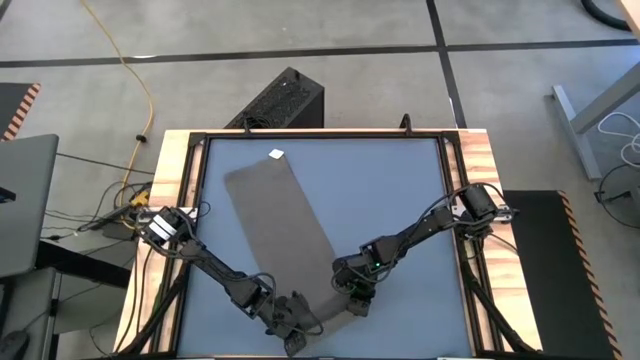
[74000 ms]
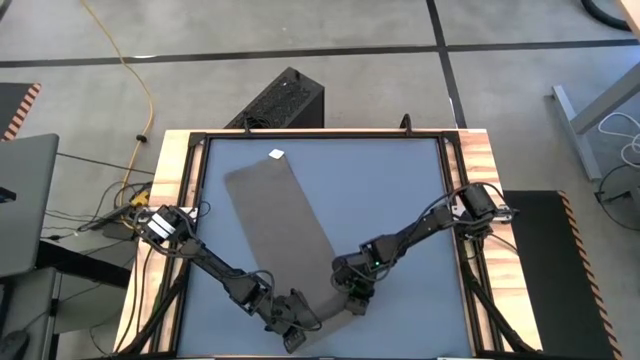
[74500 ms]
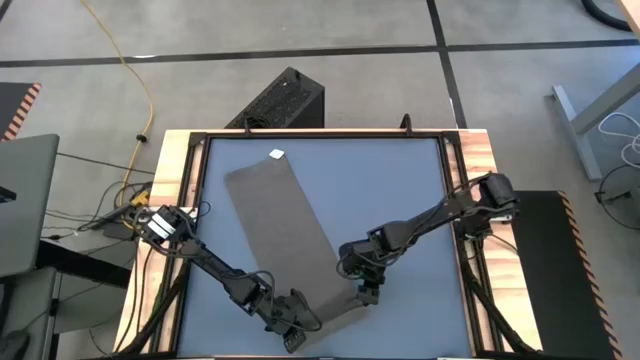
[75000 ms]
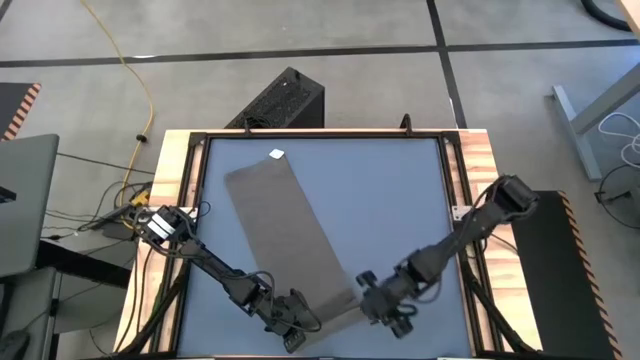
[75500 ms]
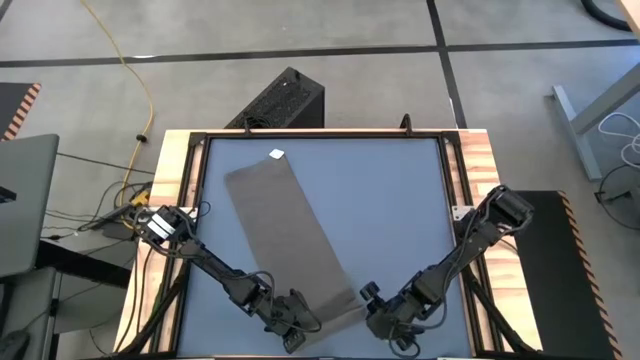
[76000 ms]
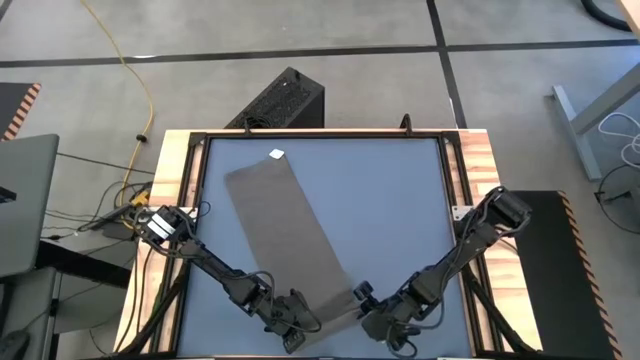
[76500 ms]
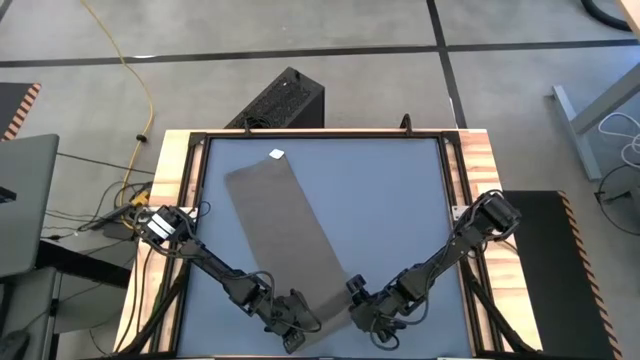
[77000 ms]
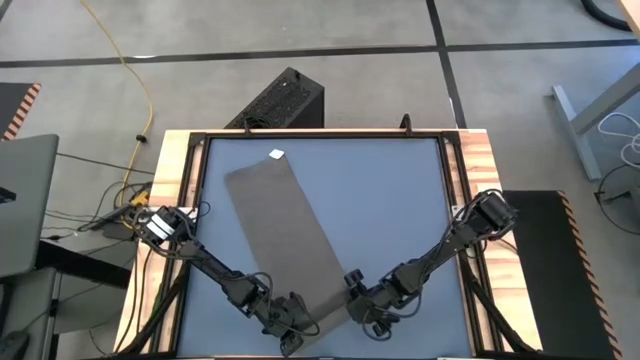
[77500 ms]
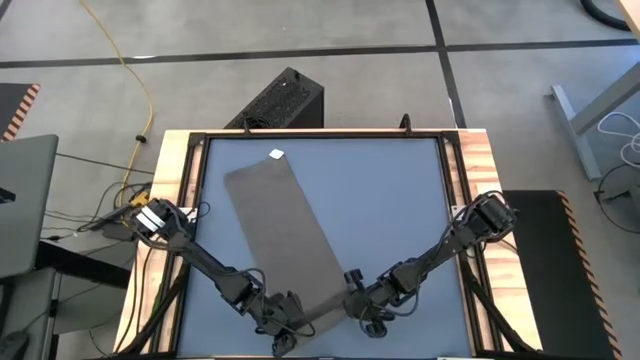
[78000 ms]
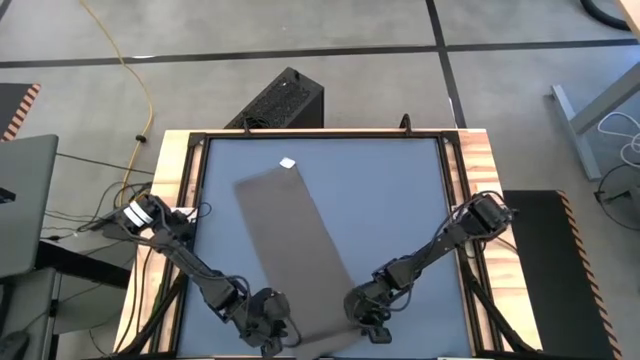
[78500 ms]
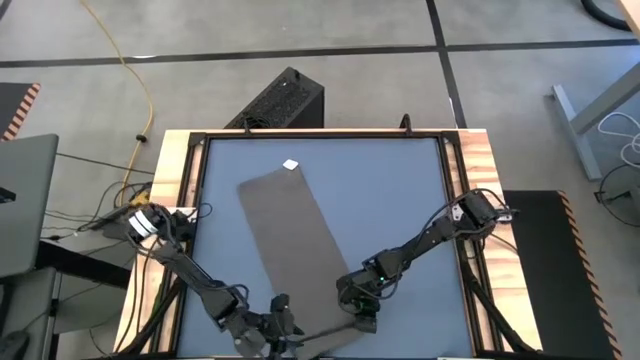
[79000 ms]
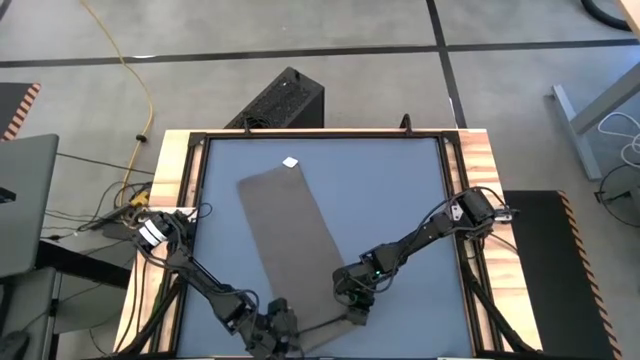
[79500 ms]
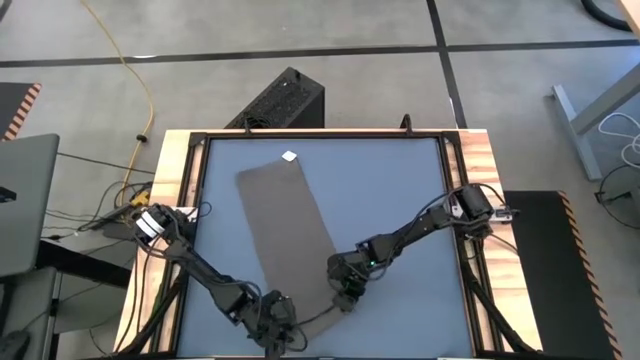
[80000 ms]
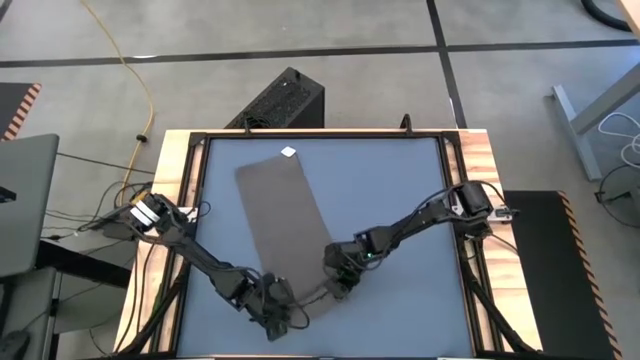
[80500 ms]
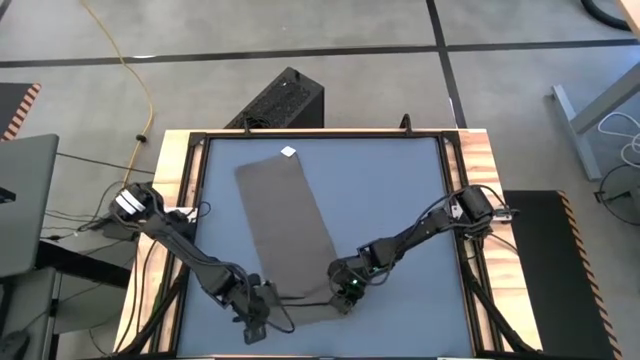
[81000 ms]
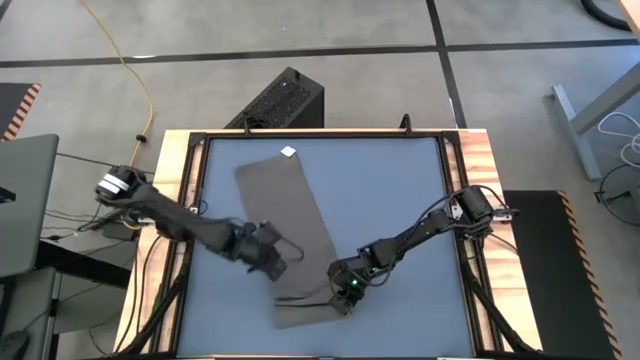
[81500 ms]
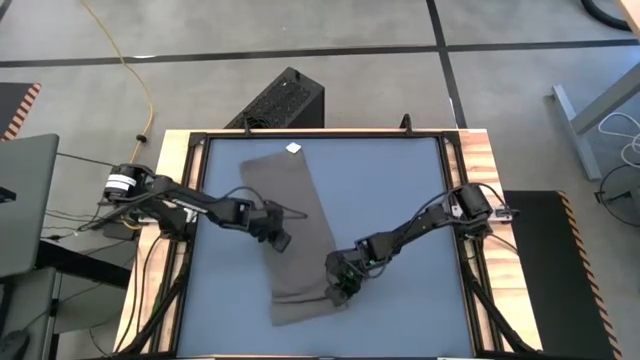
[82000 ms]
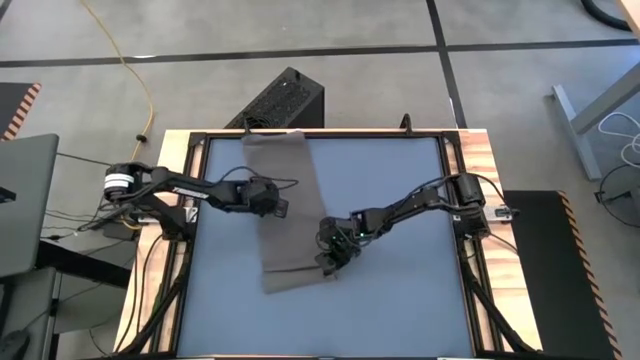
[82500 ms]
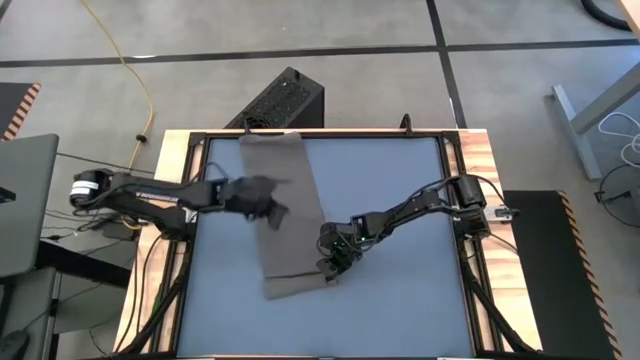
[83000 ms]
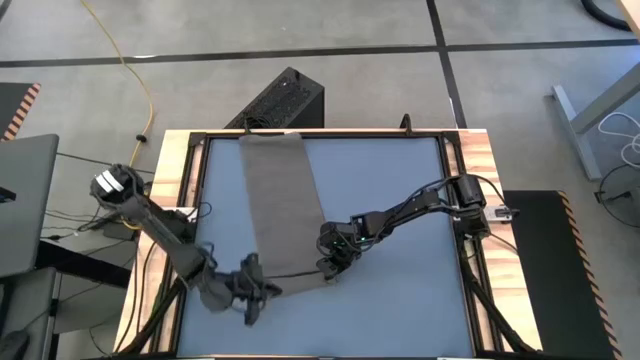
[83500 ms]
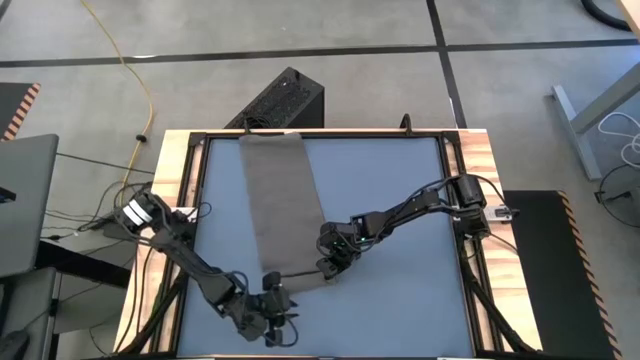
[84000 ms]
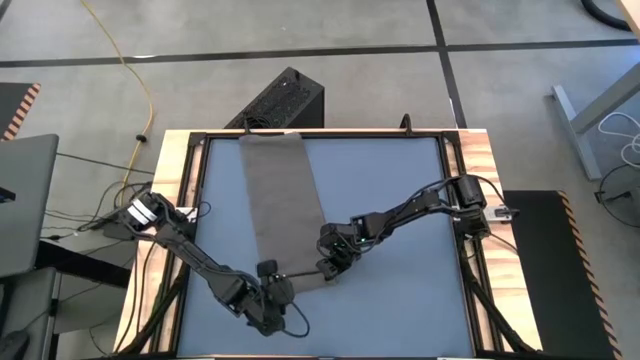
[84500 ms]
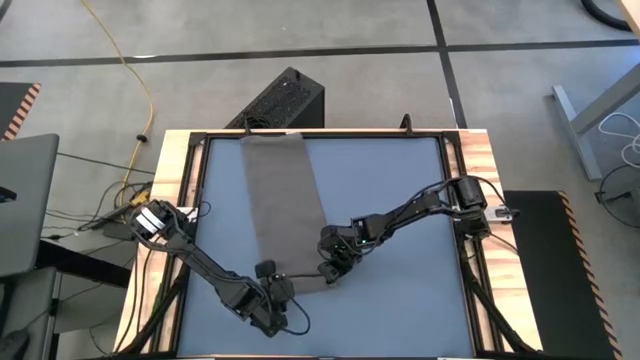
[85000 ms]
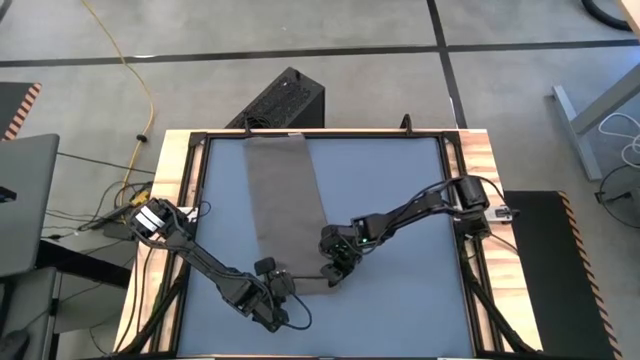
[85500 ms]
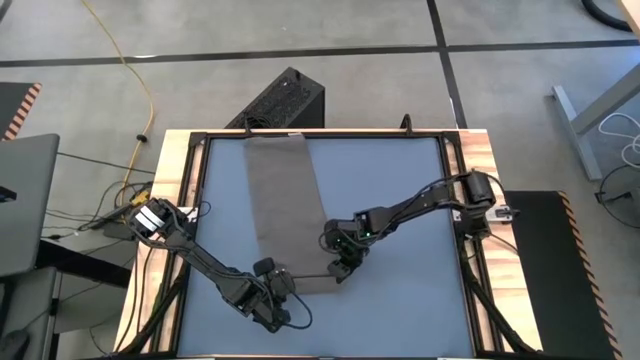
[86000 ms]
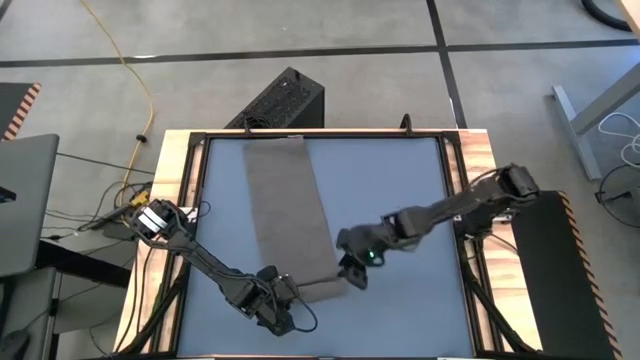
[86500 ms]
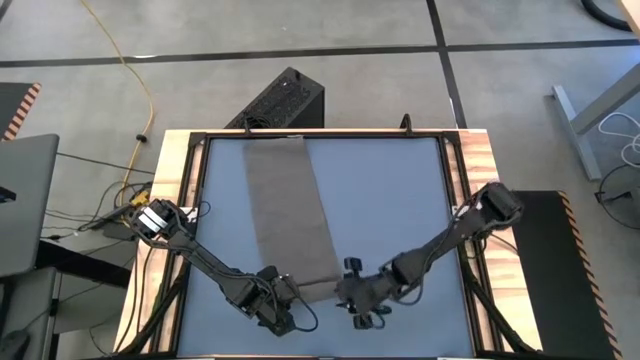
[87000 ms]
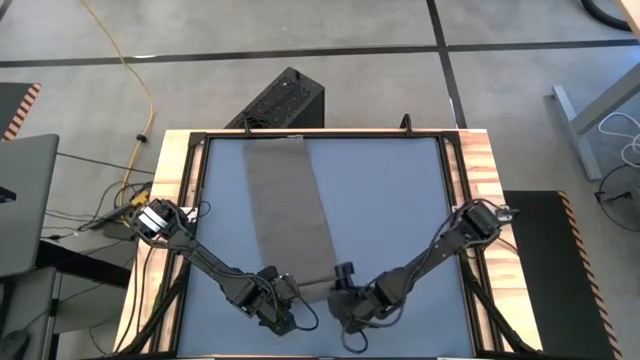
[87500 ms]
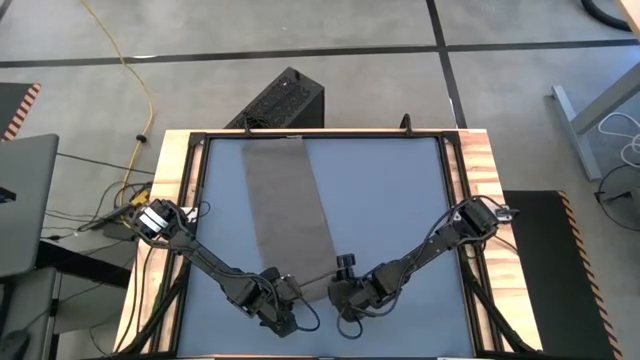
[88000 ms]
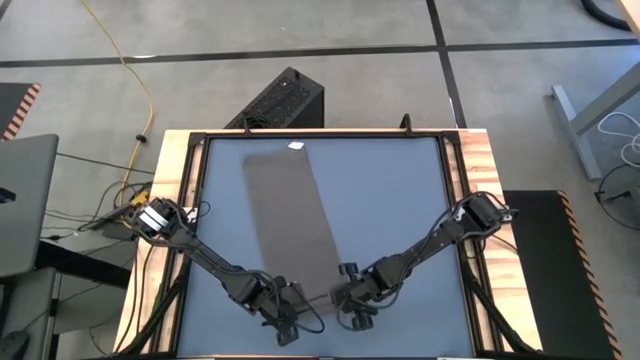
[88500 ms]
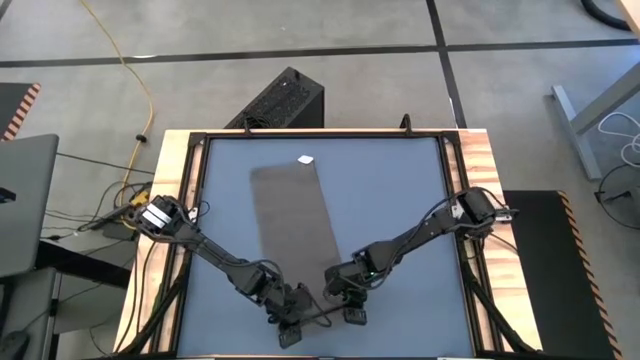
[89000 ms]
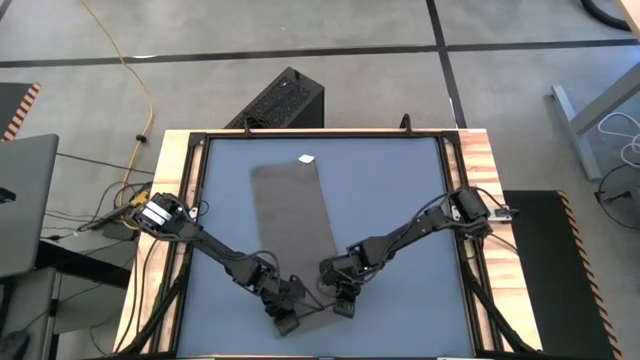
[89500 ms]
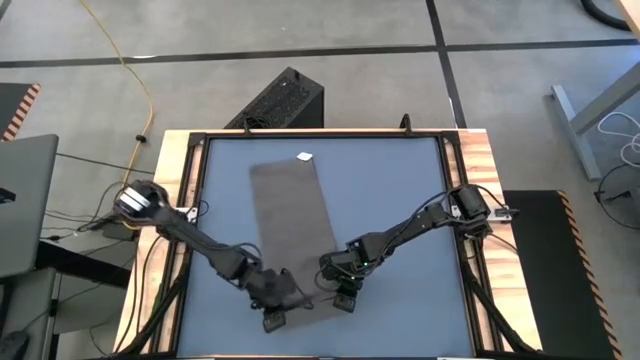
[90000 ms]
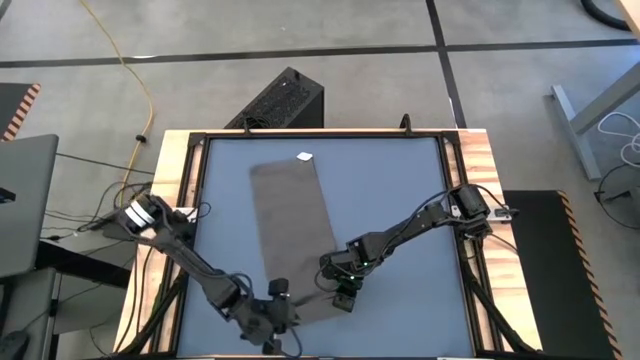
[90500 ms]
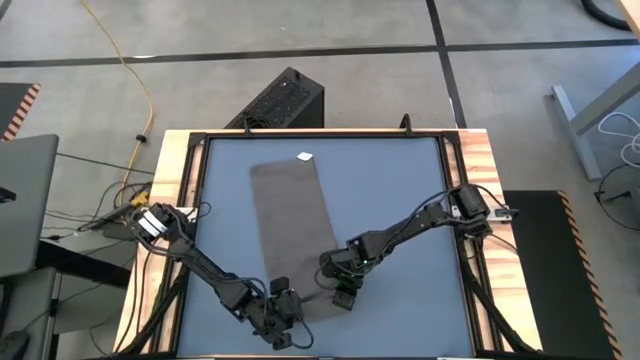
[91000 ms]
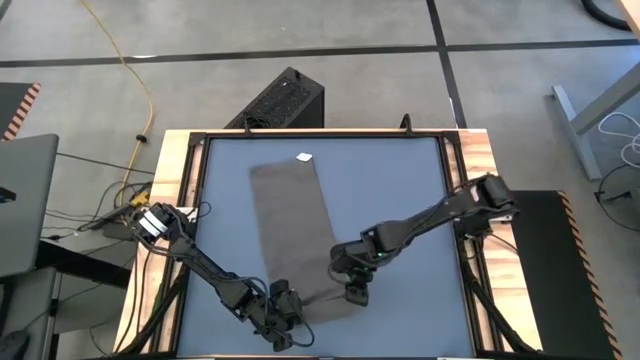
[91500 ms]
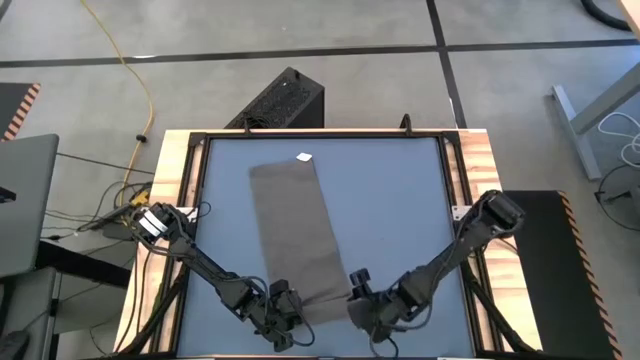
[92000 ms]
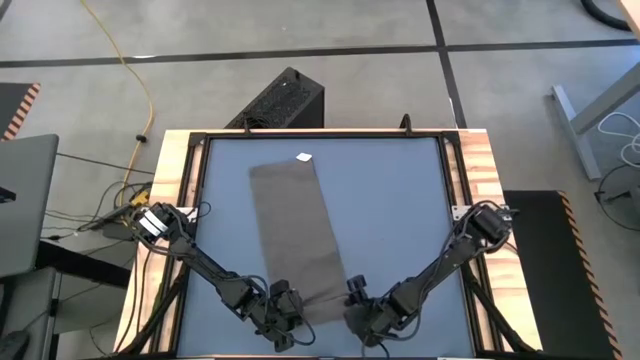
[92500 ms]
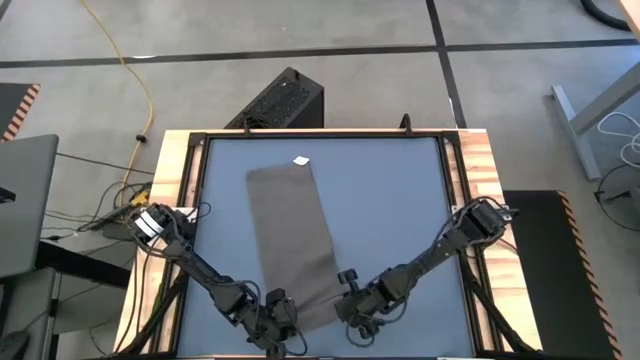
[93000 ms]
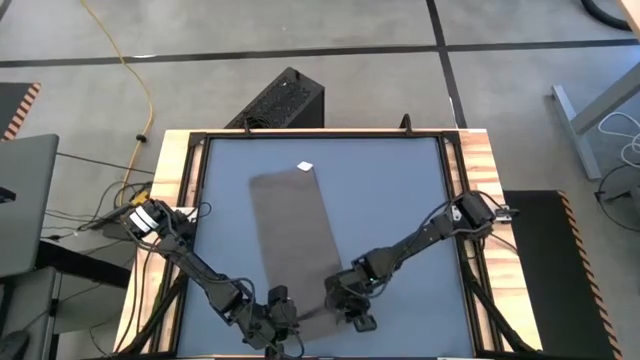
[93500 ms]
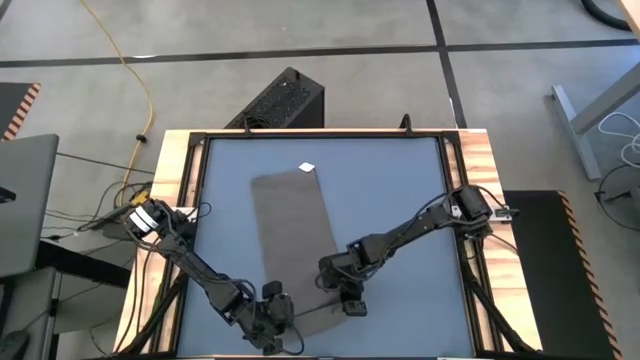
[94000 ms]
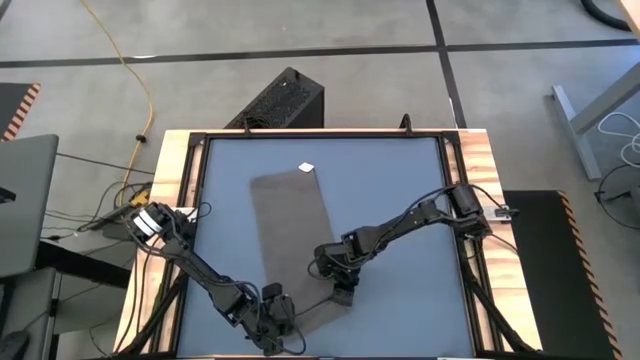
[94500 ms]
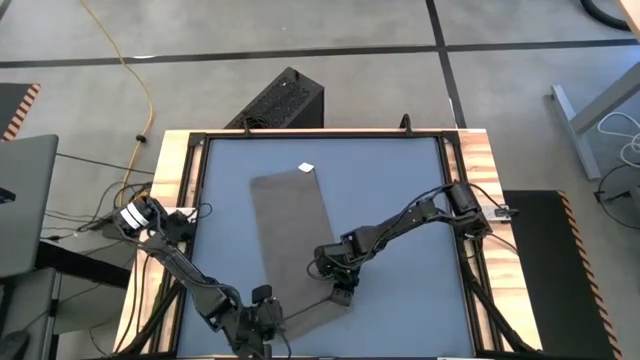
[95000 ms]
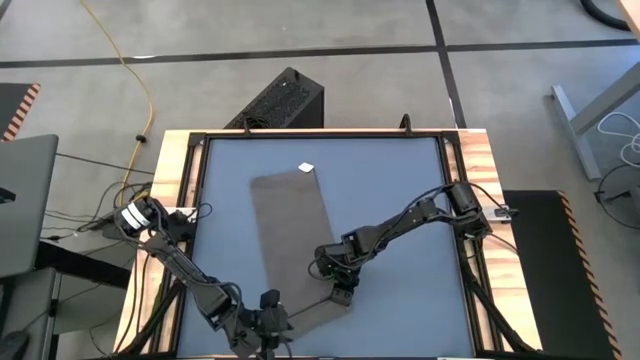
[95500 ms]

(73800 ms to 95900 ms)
Task: Roll towel
Roll the grey towel

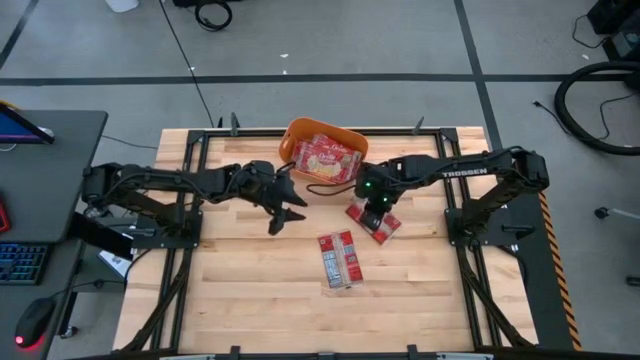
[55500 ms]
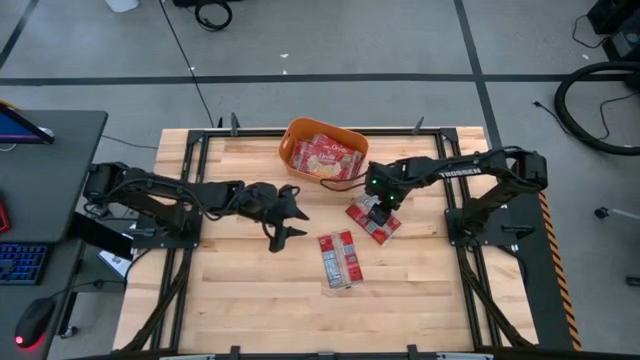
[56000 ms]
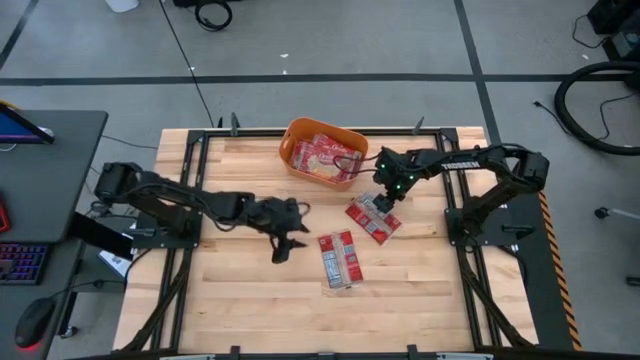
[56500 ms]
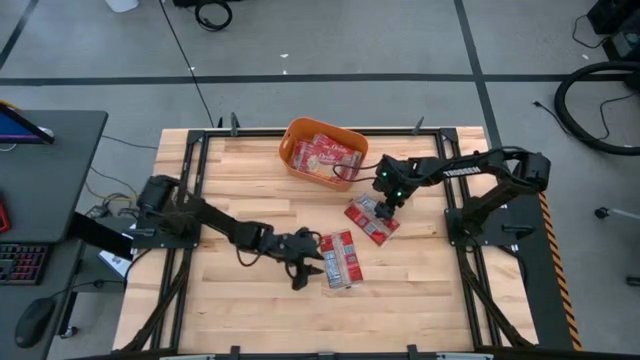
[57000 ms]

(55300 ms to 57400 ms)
Task: Sort popcorn bags into baskets
Move the red popcorn bag to the center of the table
